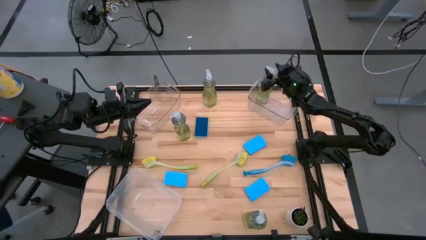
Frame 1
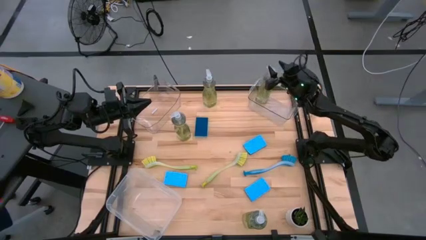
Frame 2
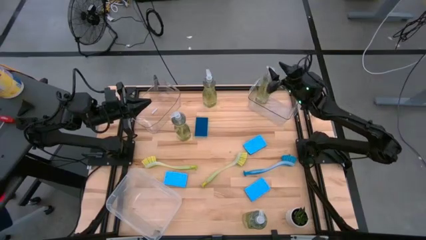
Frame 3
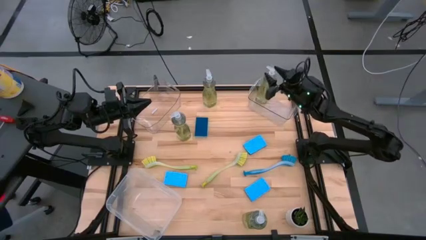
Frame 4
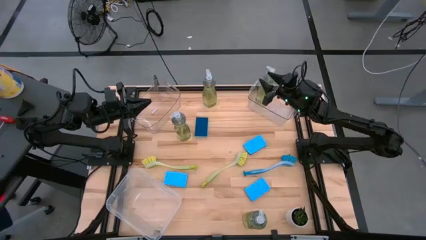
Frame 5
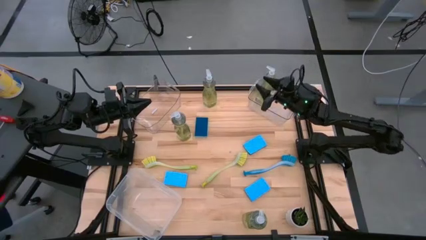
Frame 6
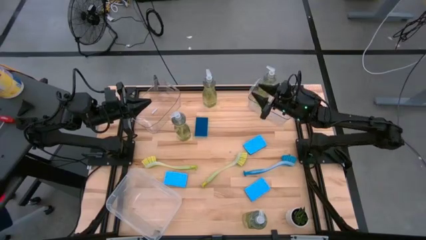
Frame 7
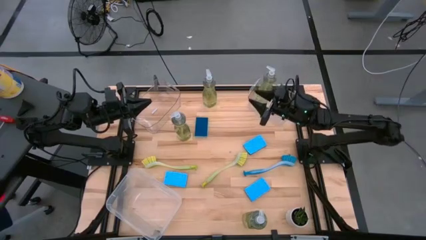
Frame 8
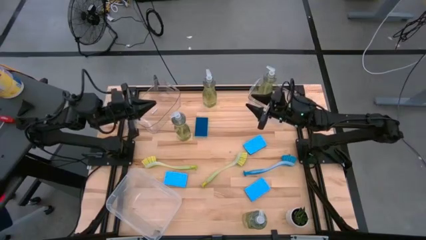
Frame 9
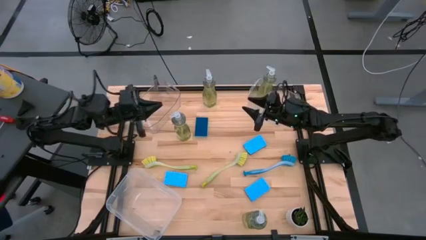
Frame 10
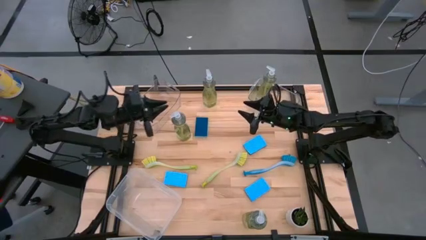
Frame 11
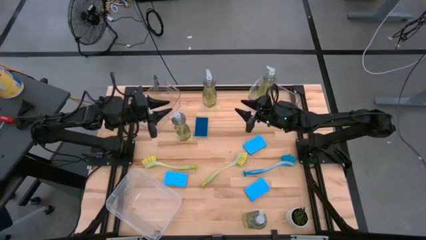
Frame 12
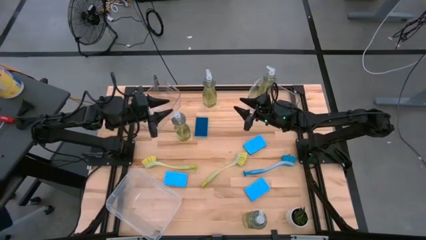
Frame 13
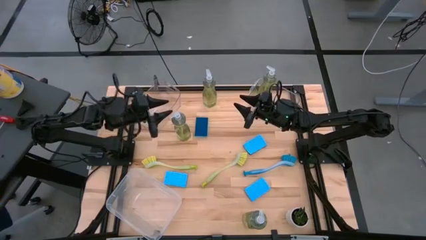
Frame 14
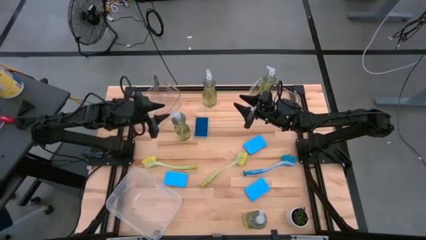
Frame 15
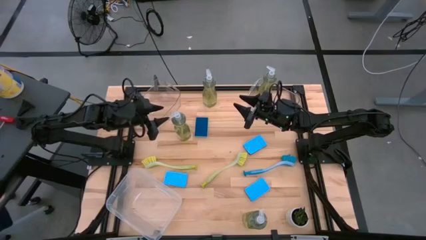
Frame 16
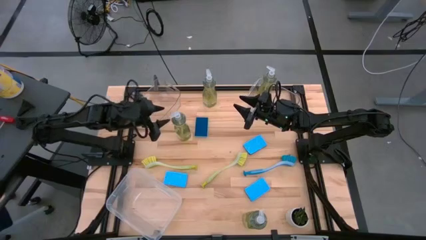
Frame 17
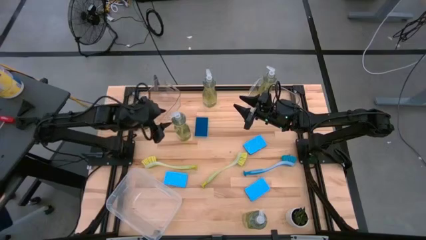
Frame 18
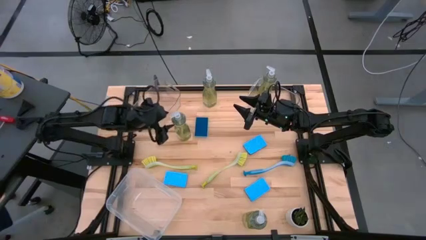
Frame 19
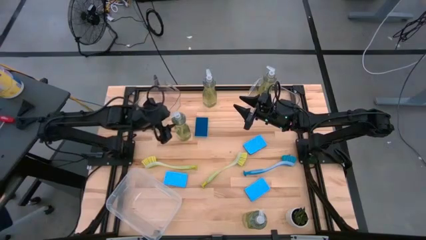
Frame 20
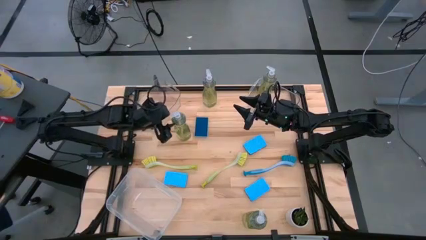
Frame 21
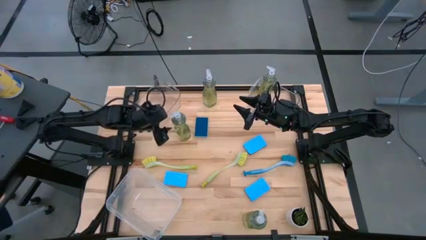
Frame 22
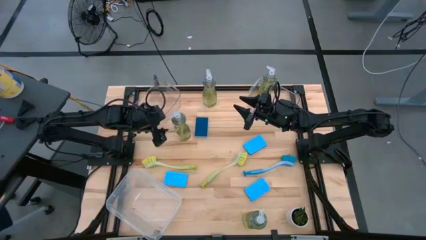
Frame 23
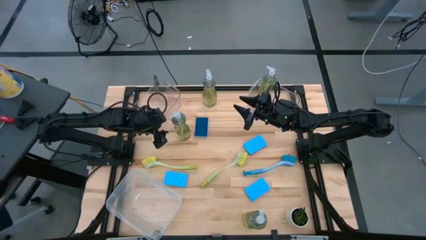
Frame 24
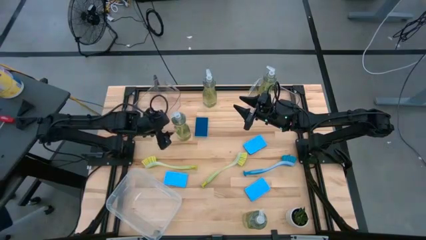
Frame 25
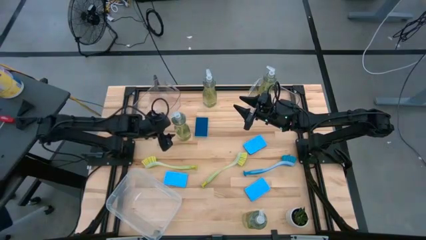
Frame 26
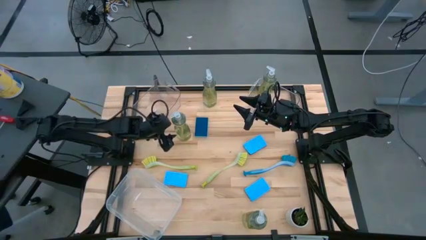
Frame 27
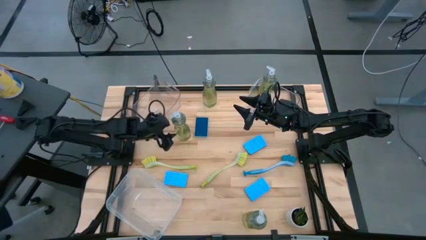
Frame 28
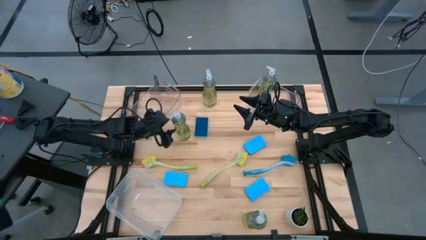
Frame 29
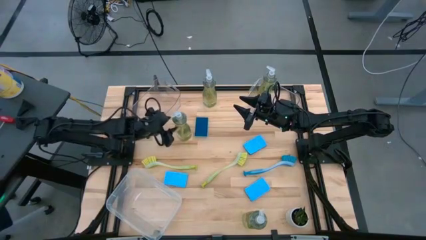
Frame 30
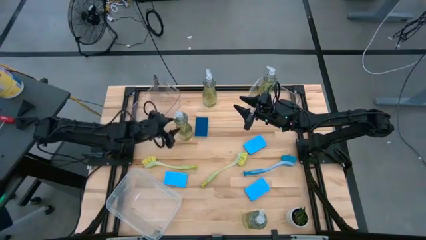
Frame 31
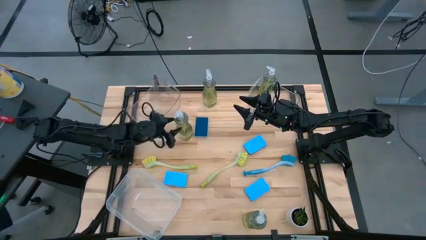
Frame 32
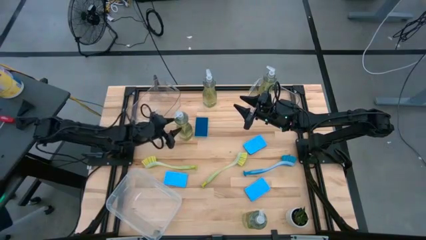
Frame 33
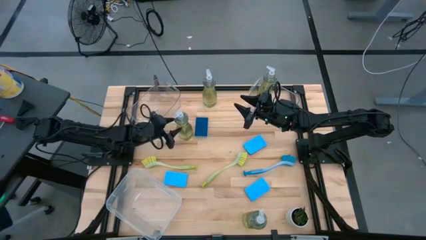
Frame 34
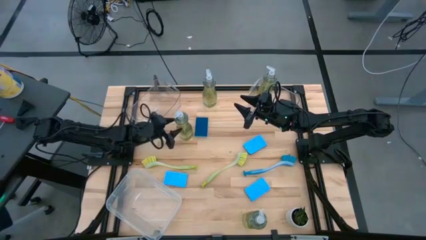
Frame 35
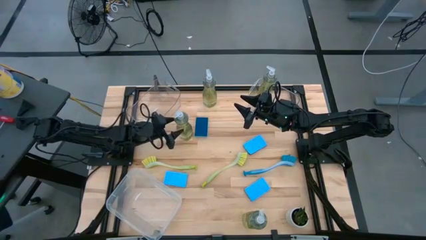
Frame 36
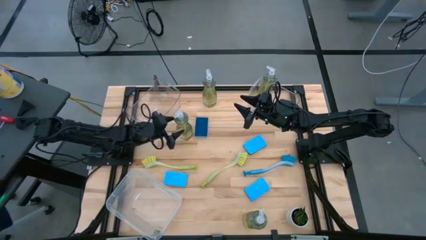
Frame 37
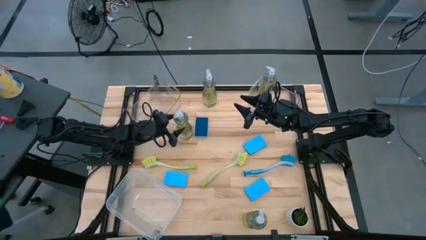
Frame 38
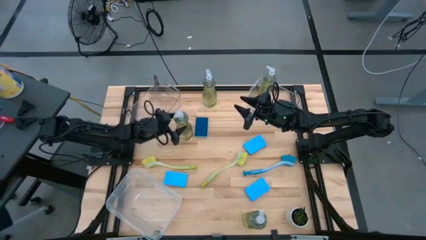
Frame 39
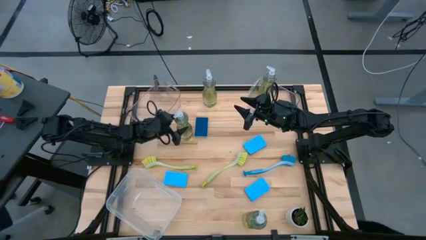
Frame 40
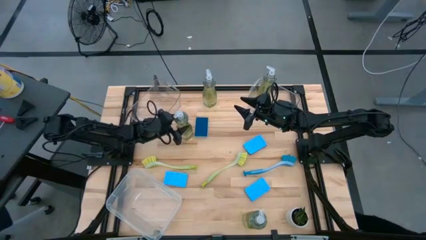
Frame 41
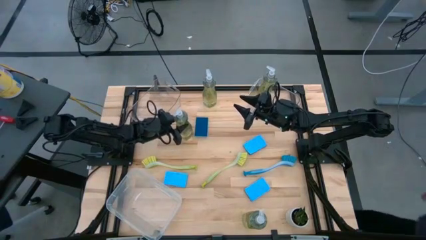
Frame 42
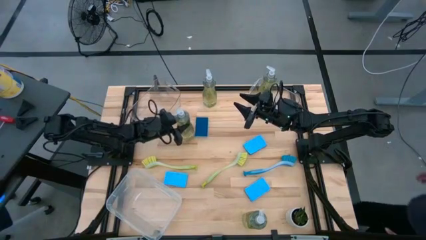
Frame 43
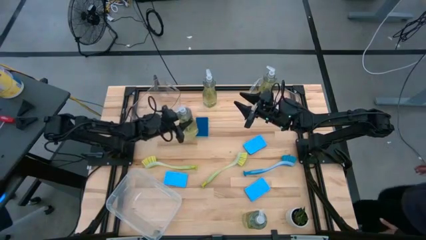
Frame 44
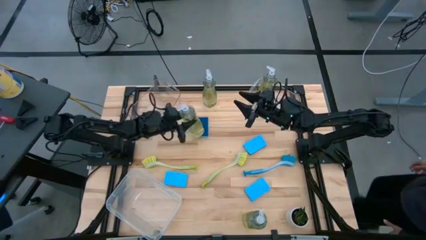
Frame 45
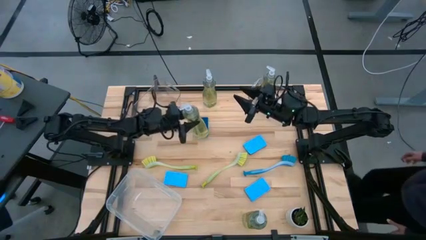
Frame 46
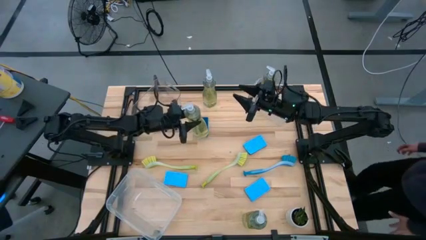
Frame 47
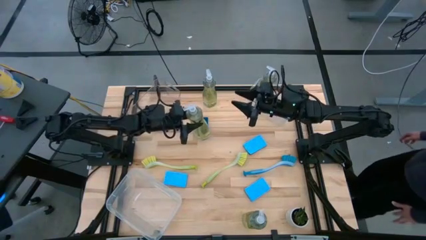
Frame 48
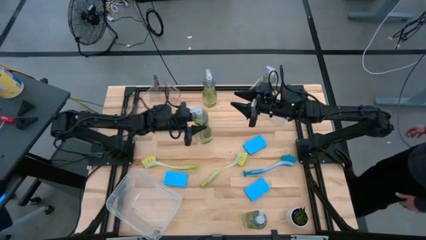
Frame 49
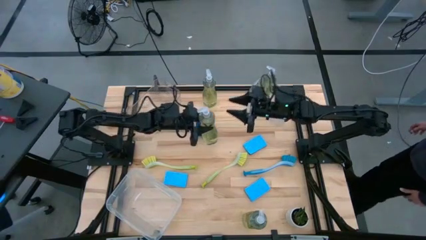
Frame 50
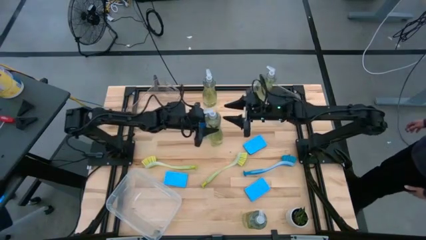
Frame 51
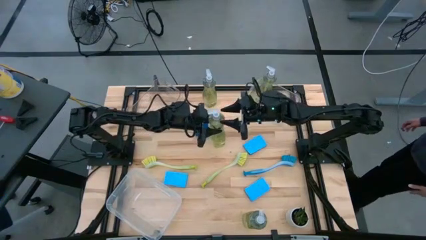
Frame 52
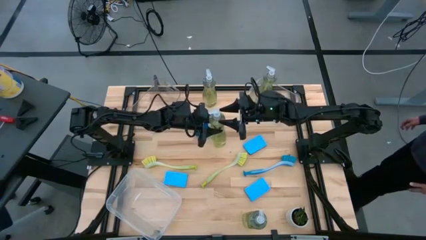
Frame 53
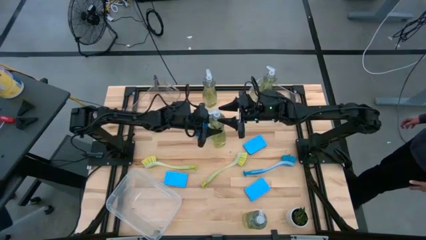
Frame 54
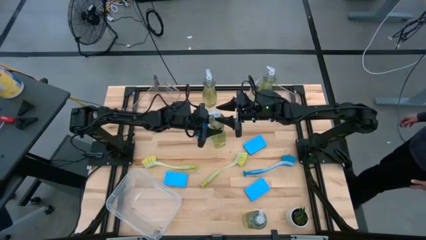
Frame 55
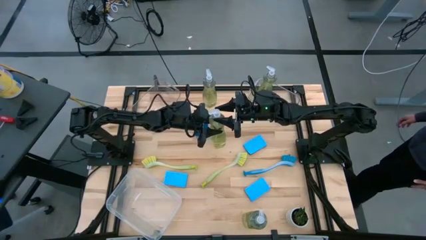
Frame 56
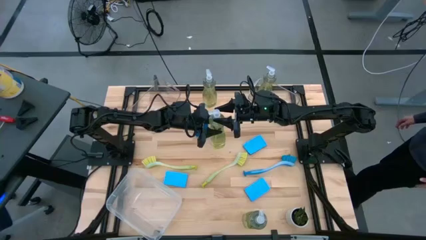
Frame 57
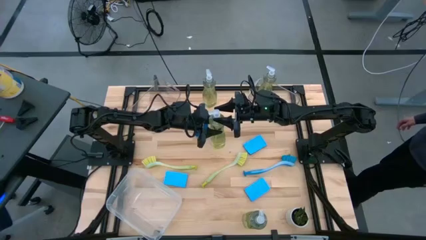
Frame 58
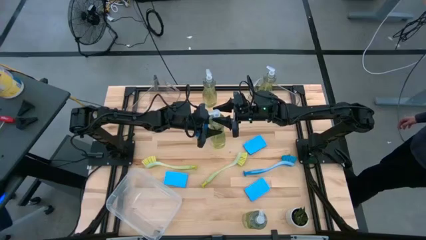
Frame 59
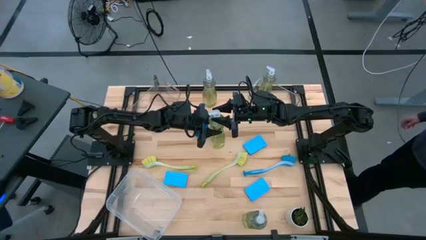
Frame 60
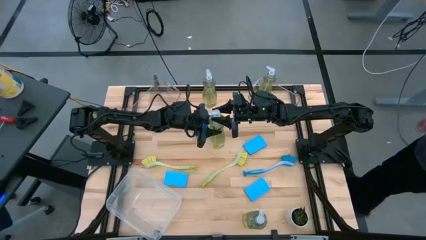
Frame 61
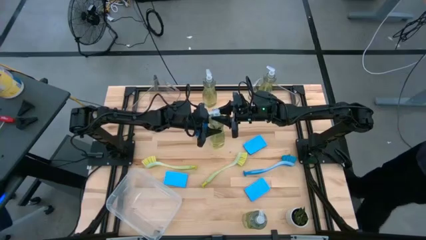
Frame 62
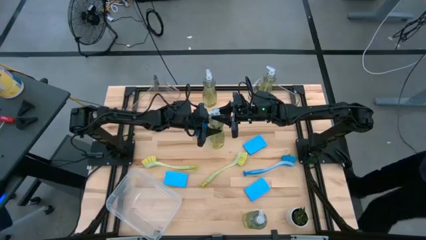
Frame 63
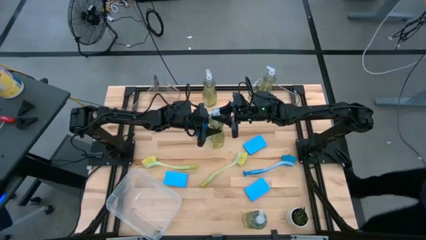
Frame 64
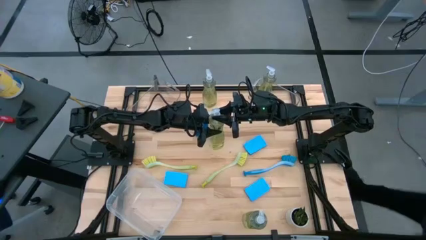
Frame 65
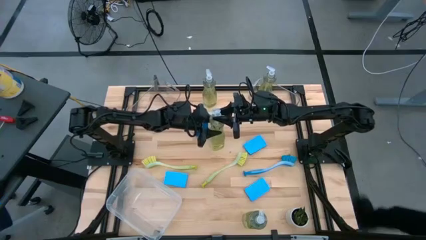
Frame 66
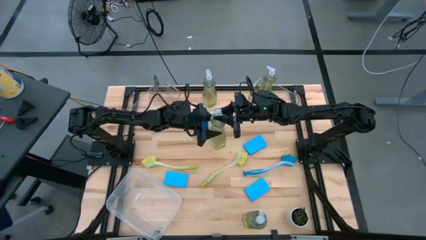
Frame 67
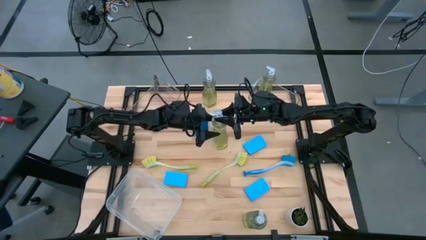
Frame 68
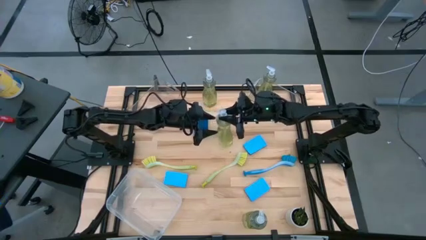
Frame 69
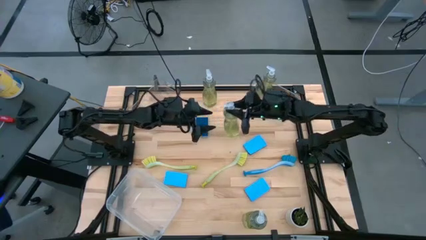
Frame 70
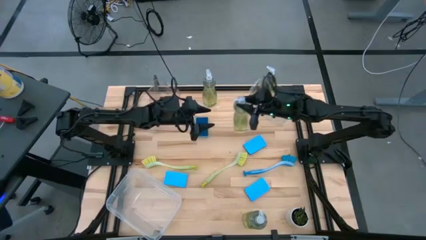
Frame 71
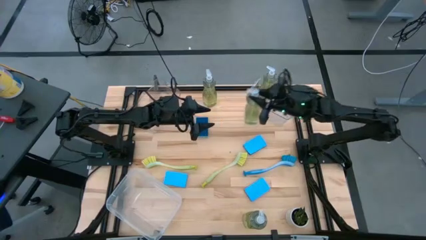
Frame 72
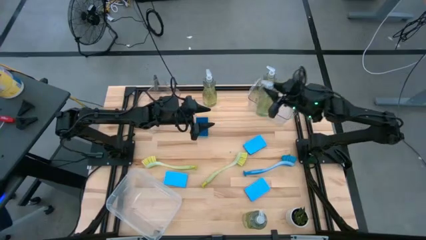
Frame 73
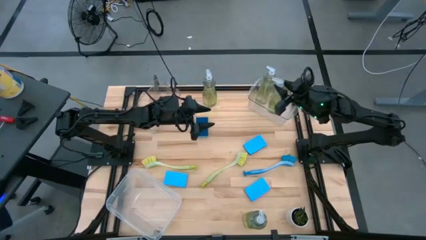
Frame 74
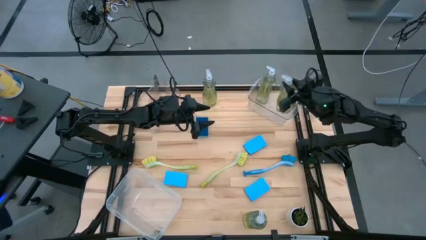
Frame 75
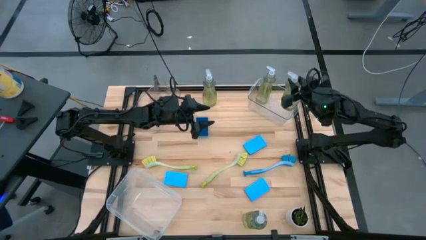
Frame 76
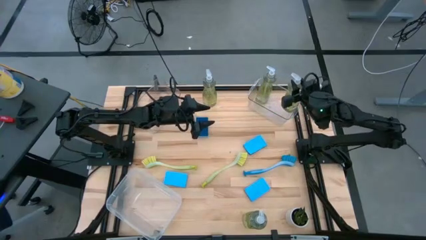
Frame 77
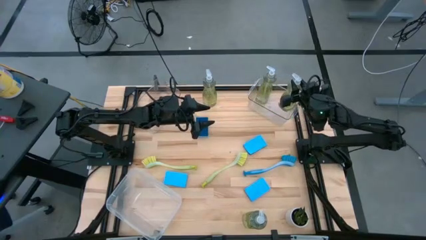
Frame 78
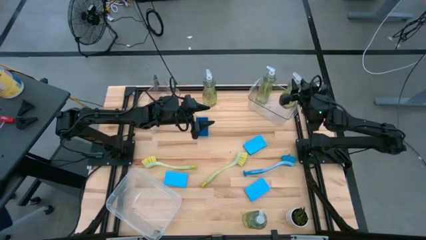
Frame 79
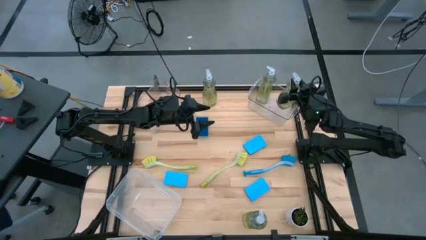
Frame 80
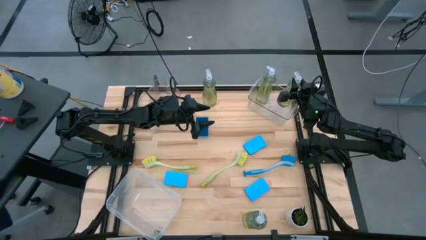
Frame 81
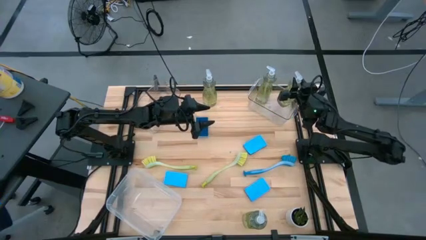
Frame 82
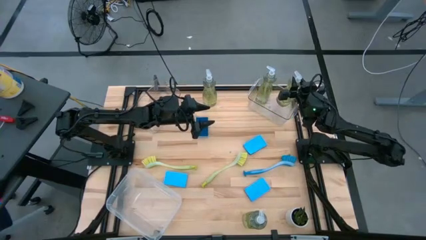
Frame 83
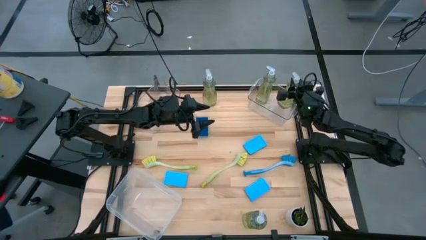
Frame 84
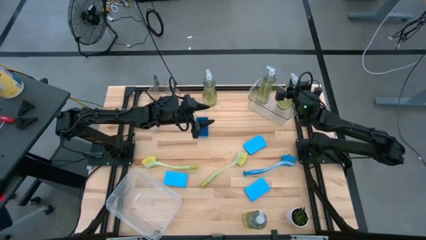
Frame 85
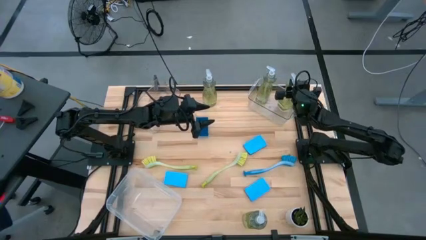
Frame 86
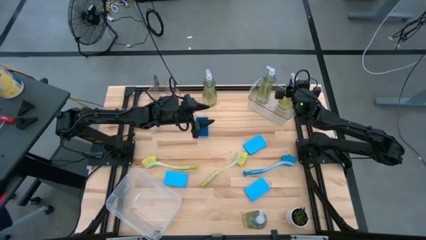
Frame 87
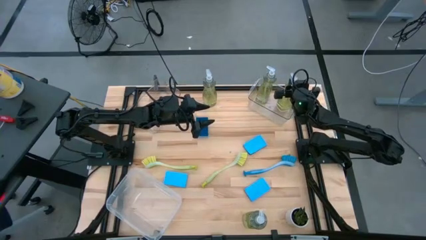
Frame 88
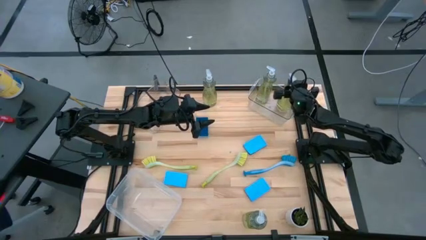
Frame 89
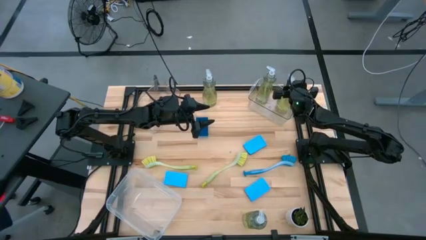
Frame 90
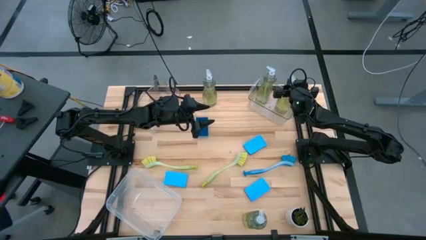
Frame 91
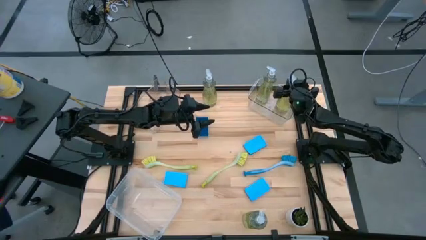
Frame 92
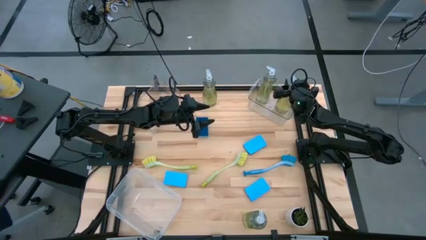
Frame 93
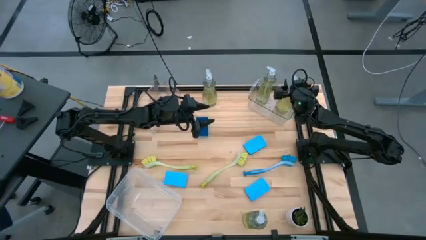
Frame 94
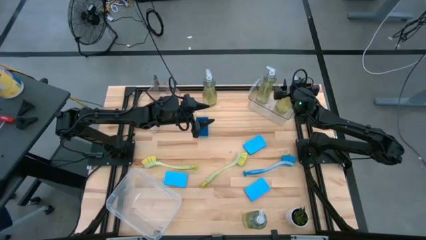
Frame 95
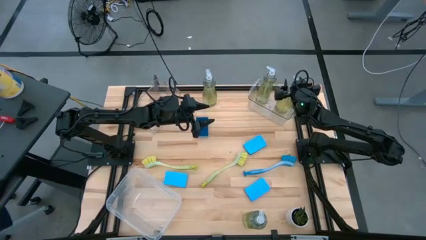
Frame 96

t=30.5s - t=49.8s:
Task: Pick & Place Kitchen Sink Supplies
Put the yellow dish soap bottle into the right transparent bin
